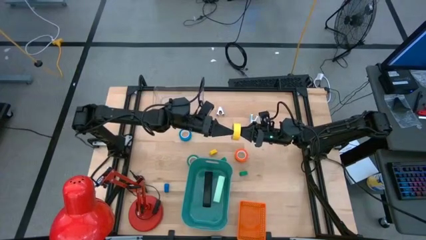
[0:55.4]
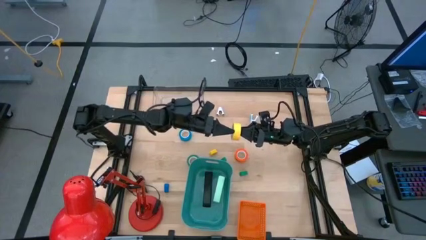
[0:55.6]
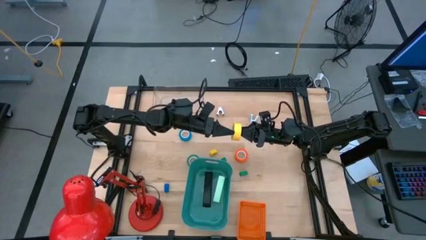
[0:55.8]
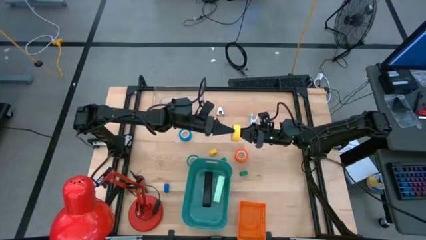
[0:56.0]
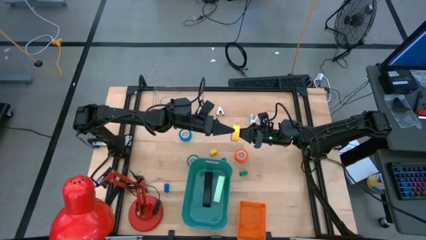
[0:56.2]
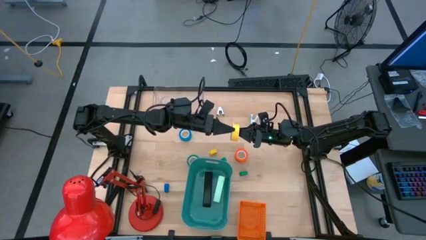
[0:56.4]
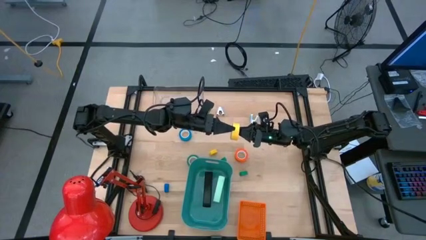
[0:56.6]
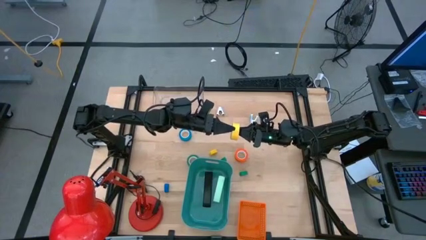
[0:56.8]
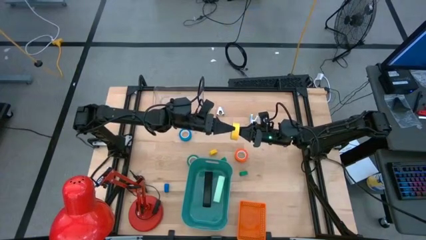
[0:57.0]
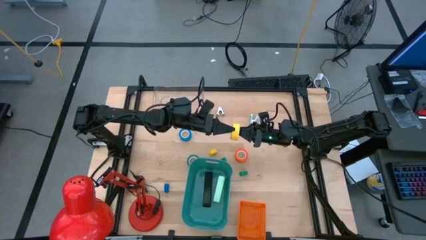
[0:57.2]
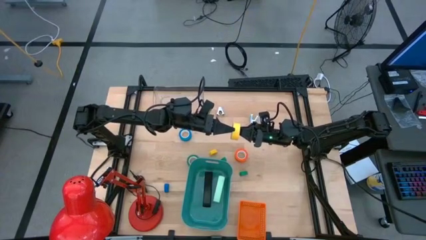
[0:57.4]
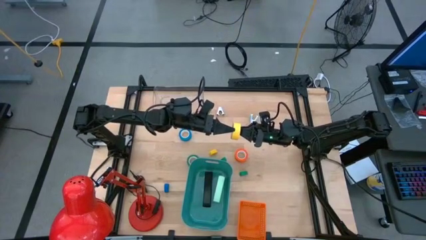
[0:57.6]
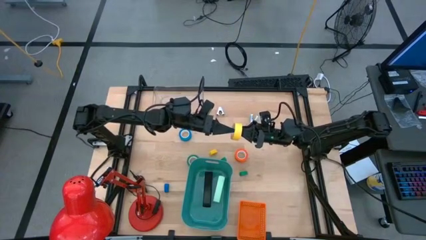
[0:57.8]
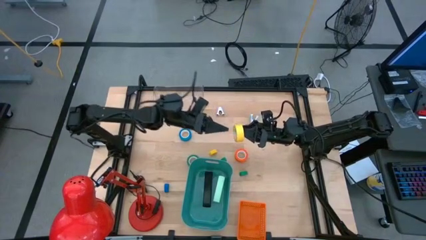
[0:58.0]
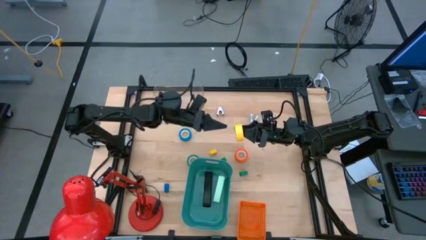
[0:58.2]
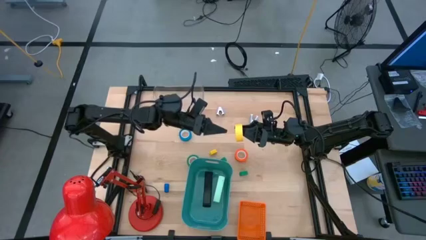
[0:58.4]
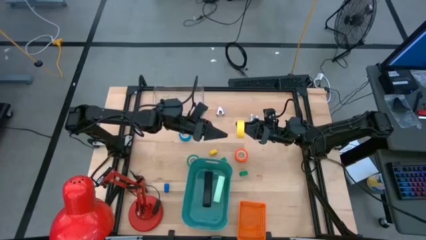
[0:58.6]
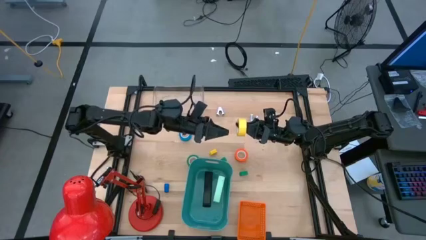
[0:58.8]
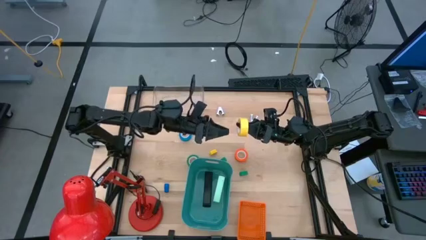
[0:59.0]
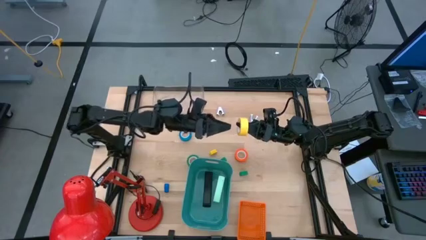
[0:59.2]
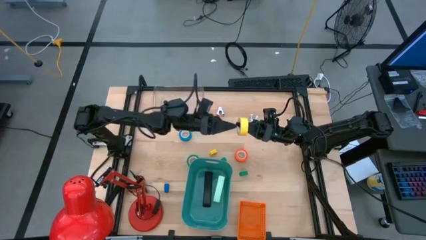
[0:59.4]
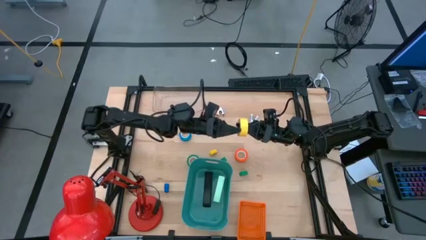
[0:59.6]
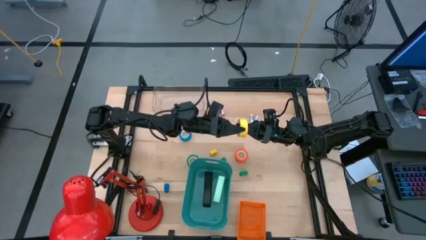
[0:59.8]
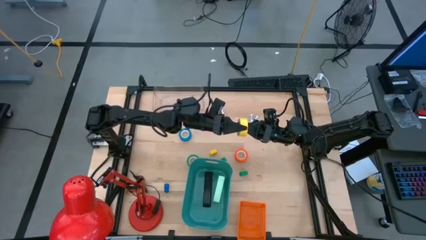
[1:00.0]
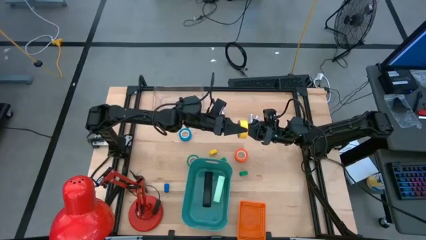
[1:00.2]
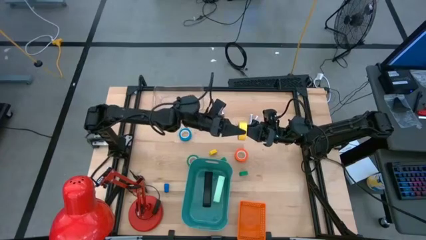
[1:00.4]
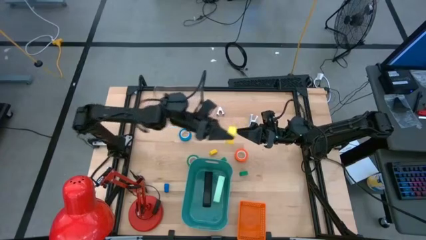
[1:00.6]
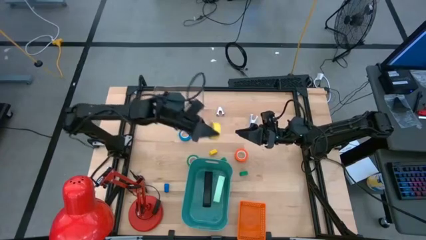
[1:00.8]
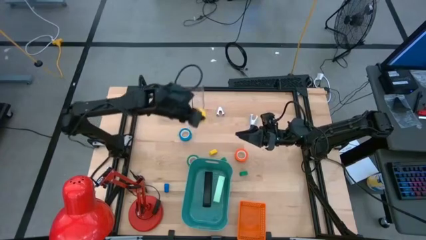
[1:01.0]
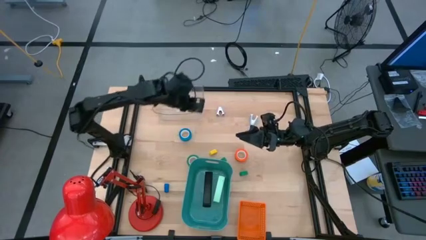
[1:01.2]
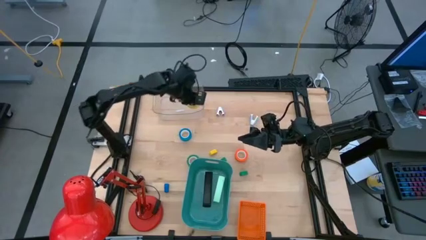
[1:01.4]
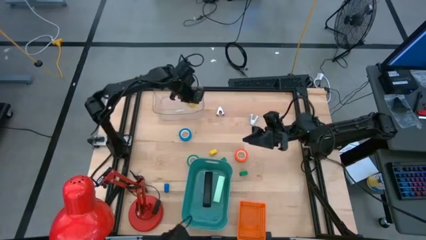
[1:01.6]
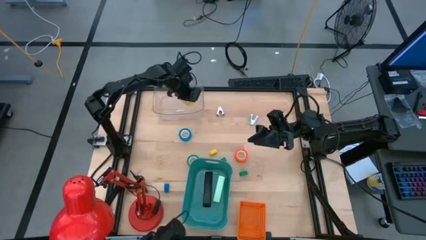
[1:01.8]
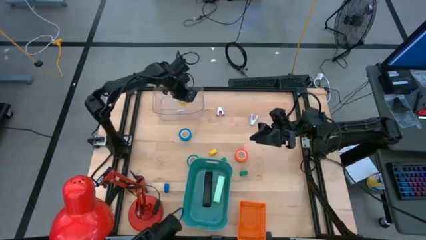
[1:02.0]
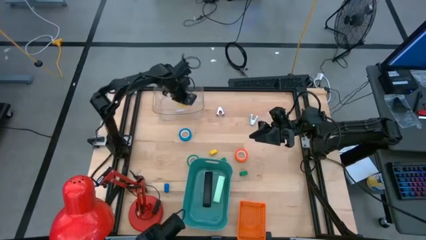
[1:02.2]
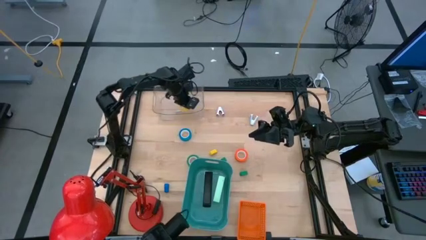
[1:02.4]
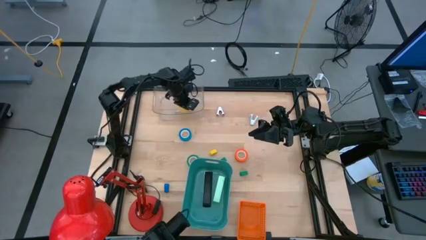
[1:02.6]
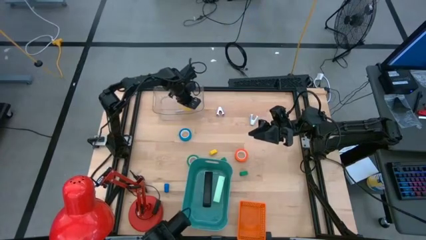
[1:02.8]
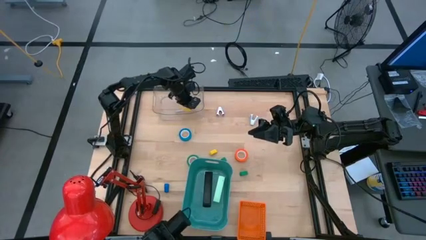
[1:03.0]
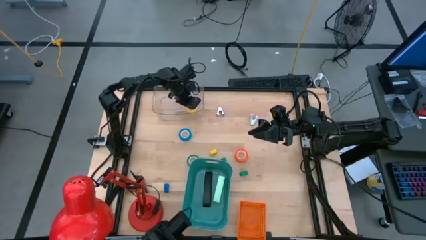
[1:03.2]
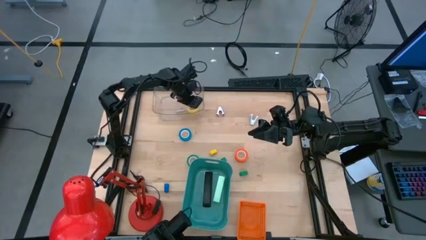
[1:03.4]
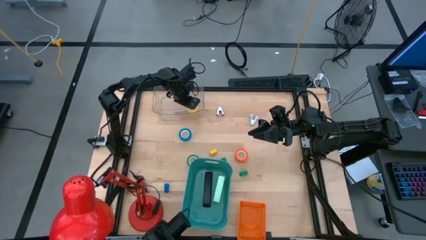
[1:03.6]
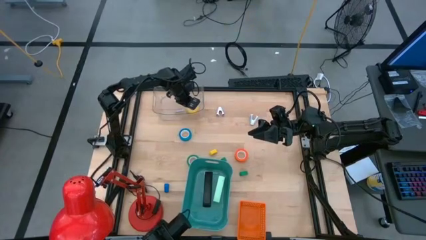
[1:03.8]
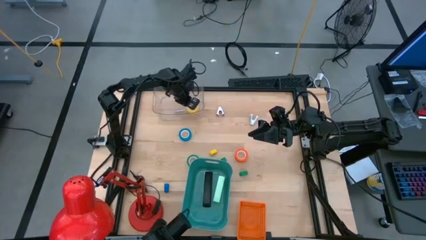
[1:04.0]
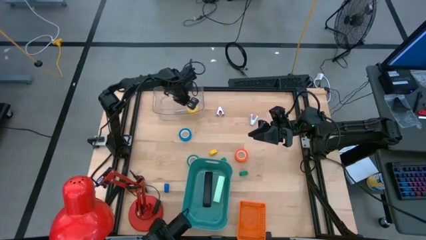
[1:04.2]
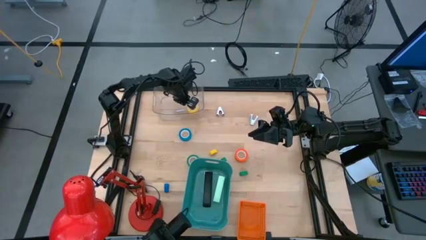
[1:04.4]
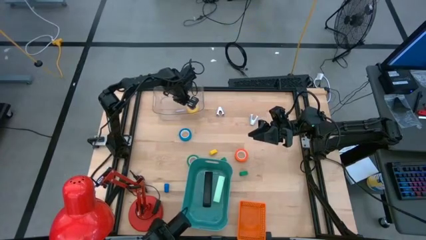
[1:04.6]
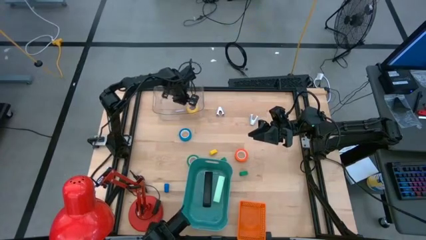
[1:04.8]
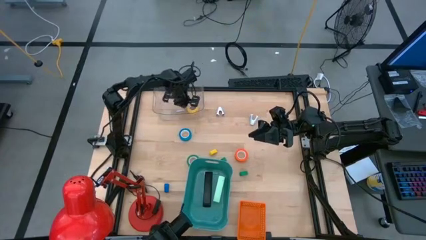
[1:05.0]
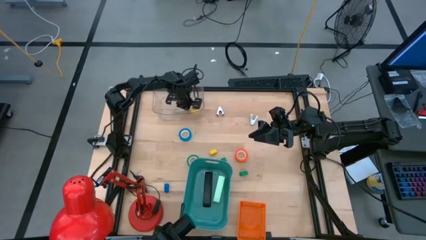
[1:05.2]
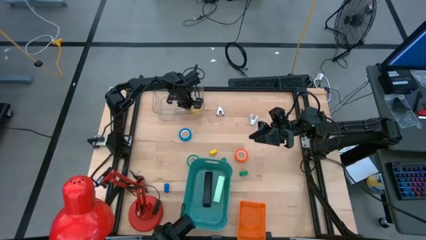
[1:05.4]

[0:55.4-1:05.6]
Task: Pick and place Stapler, Stapler remover, tape
Put the yellow tape into the transparent bin

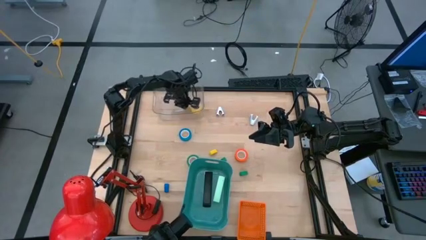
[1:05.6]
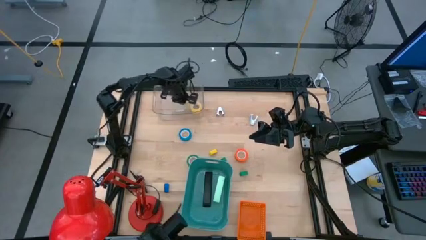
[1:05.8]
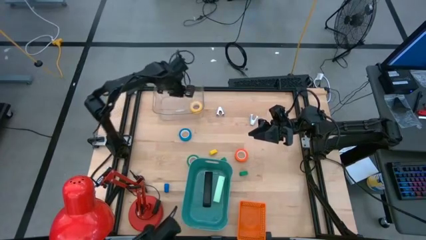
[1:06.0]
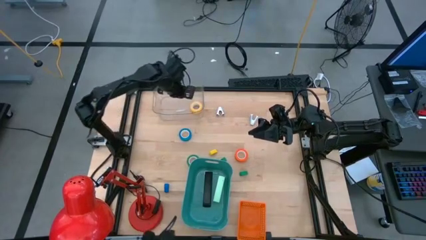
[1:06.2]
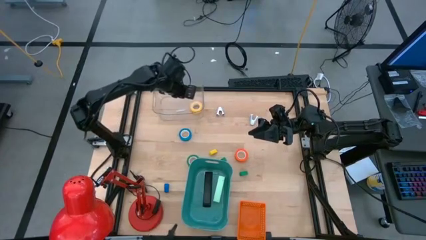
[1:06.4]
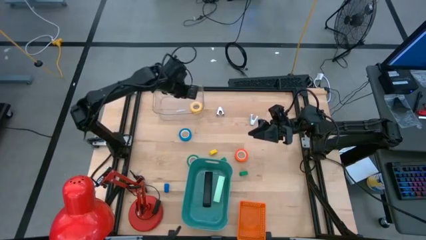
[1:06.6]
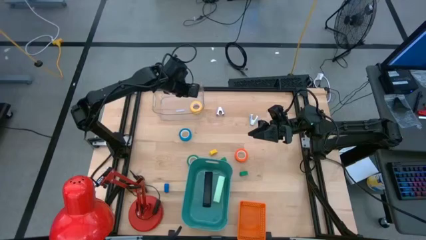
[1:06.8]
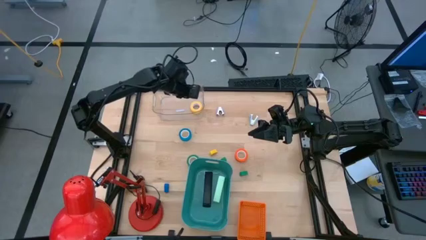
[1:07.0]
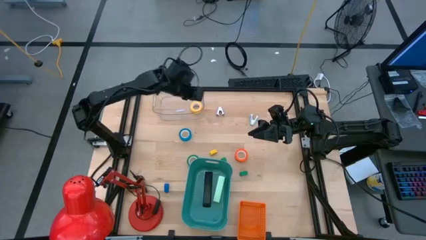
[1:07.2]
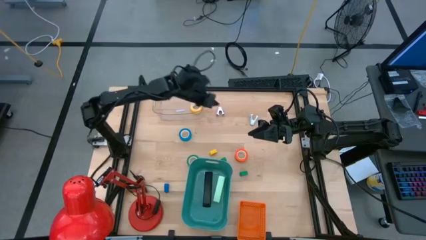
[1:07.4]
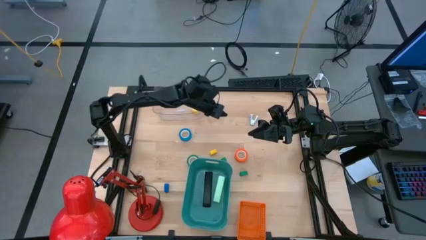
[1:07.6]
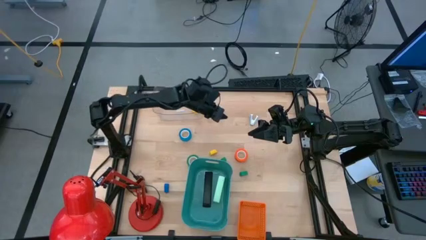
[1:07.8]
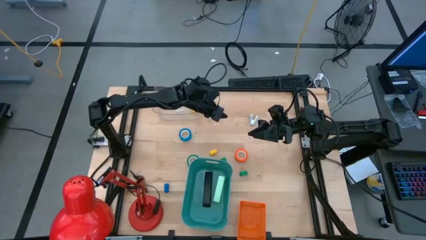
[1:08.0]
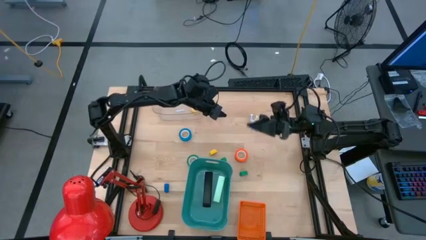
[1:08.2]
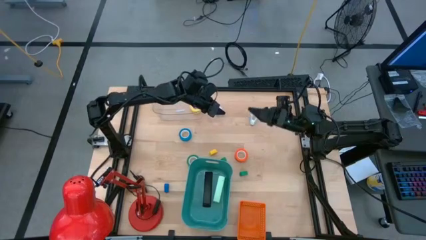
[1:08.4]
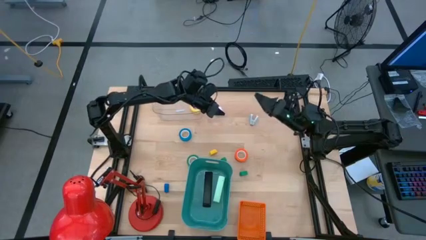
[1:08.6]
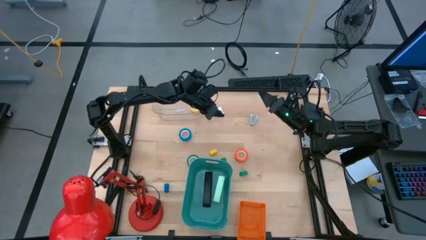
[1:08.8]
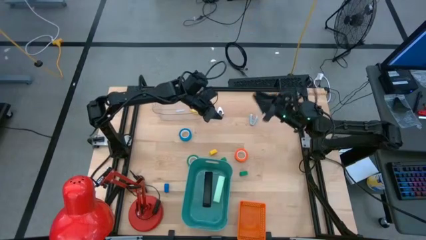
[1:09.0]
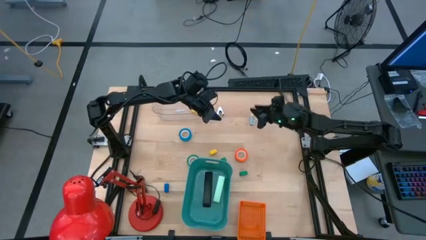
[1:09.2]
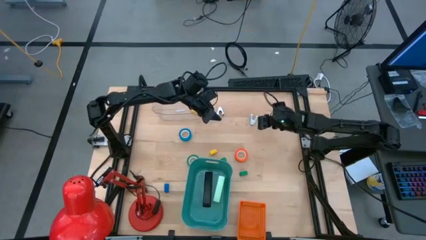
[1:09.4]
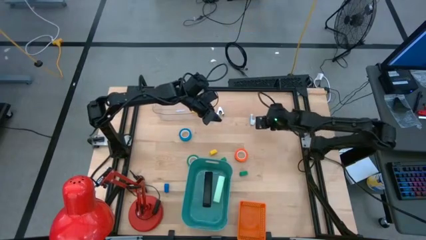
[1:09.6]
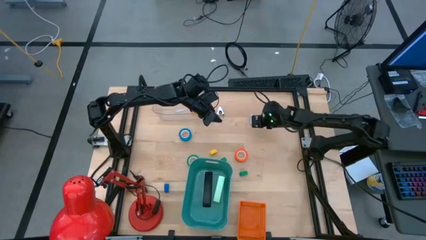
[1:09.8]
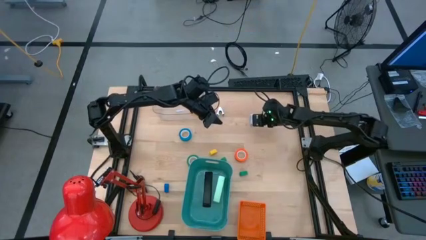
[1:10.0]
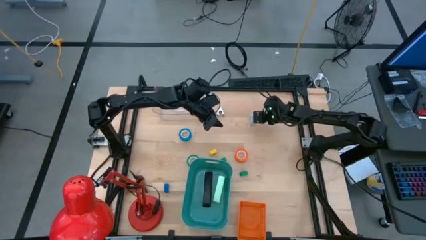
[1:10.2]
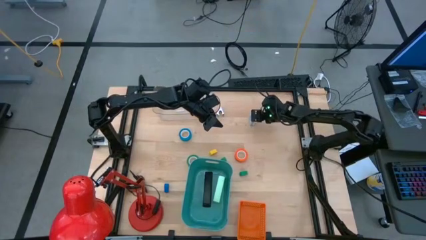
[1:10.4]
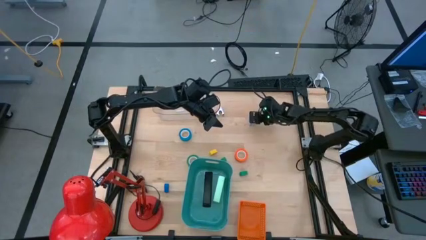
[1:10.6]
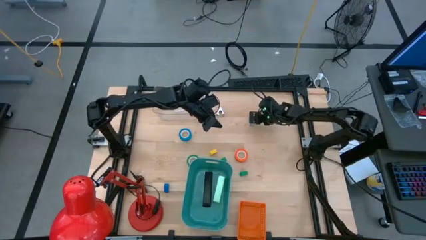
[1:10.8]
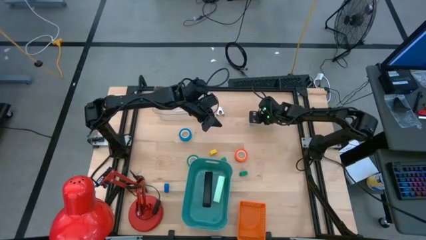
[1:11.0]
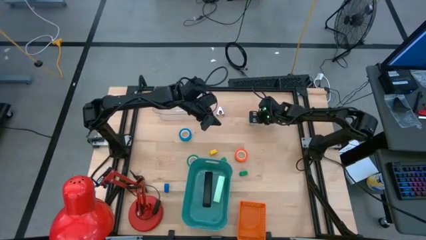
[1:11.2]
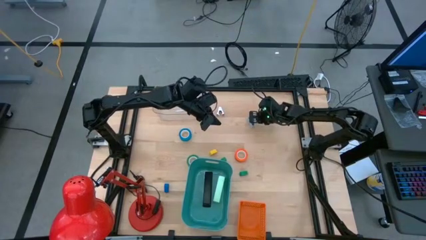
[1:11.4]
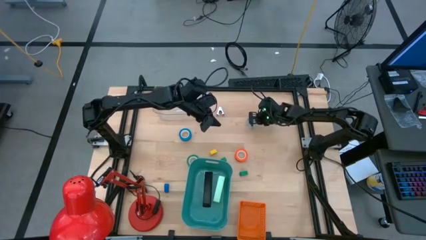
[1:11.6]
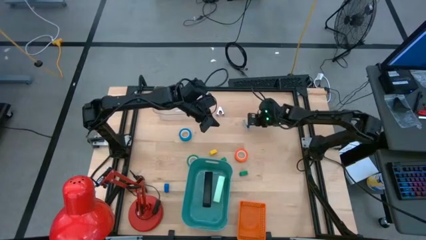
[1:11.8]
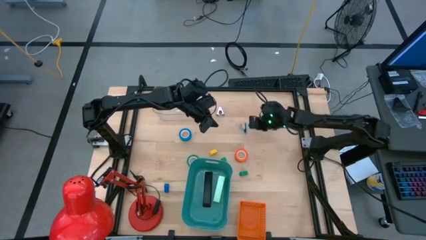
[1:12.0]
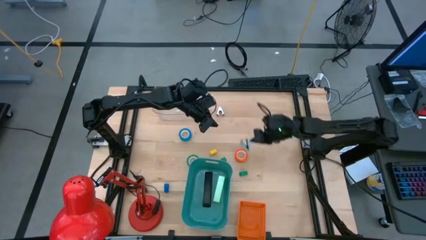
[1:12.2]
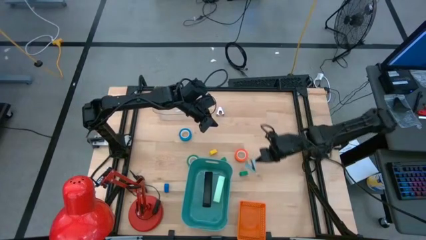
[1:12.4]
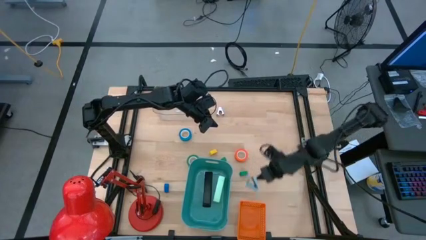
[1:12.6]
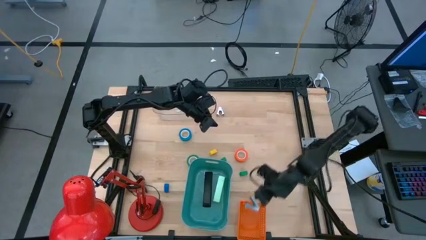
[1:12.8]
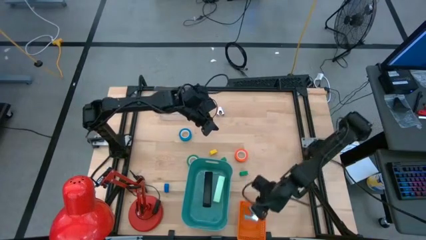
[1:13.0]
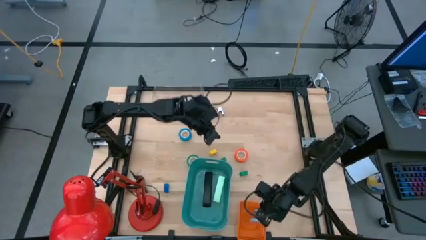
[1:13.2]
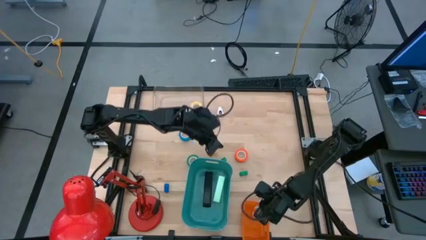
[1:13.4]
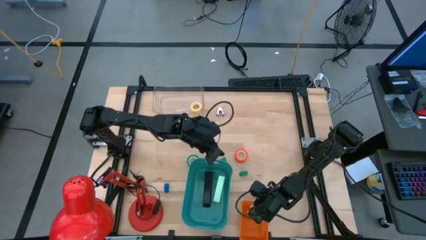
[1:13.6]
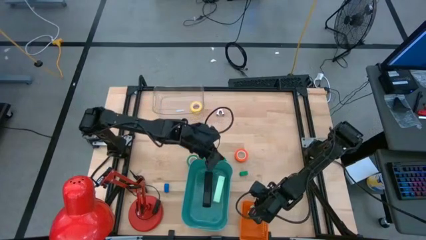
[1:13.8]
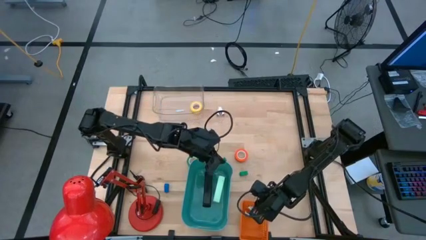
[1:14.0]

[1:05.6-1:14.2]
Put the blue staple remover into the orange bin
